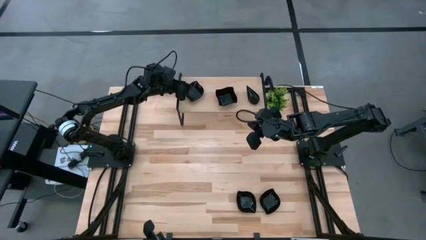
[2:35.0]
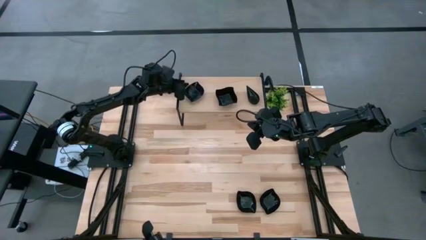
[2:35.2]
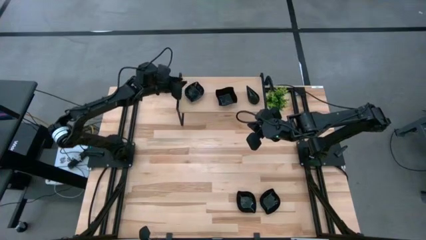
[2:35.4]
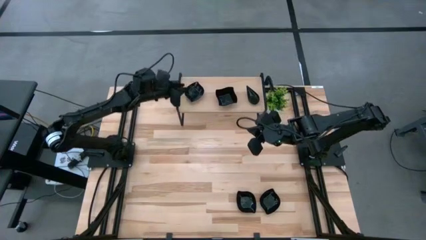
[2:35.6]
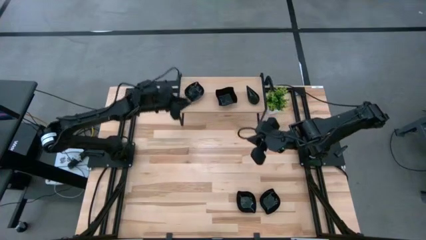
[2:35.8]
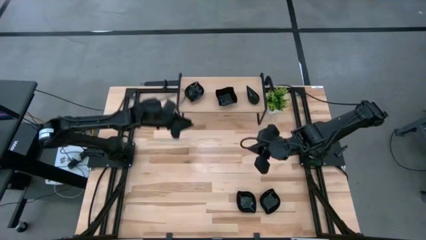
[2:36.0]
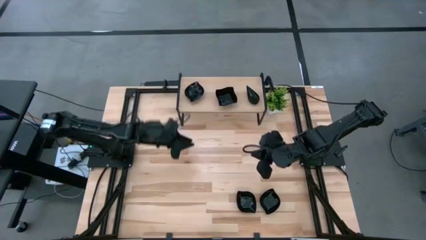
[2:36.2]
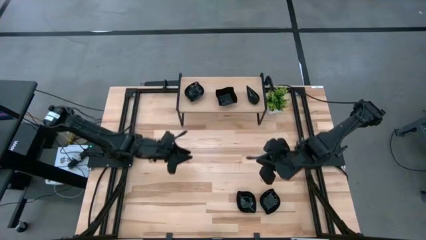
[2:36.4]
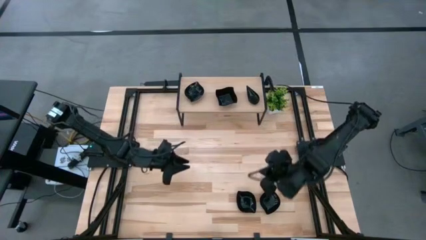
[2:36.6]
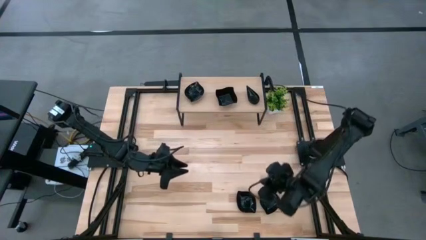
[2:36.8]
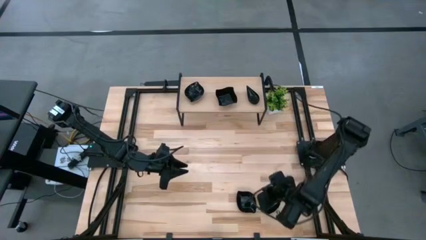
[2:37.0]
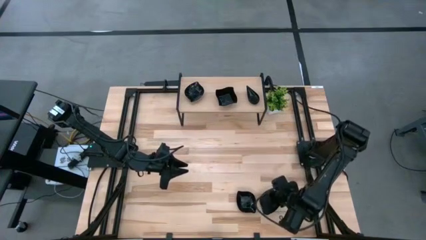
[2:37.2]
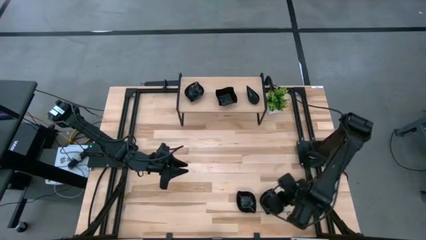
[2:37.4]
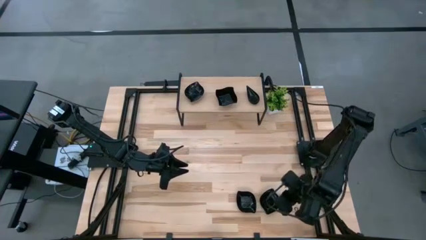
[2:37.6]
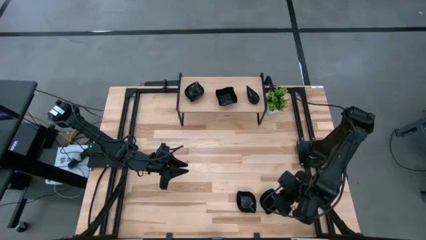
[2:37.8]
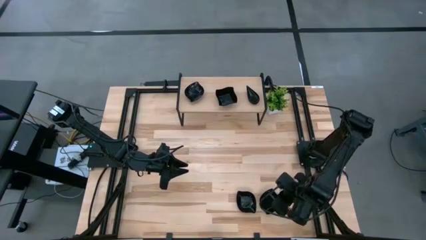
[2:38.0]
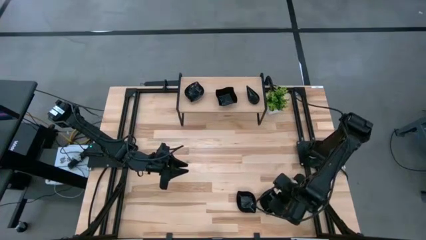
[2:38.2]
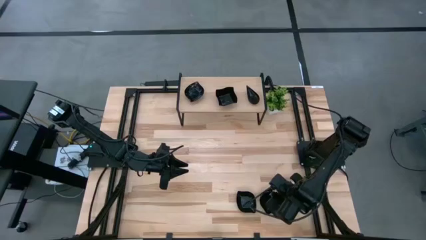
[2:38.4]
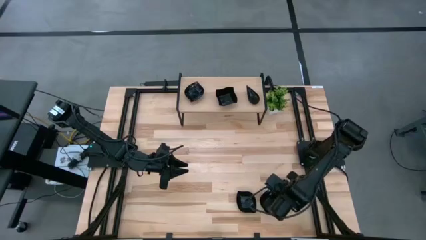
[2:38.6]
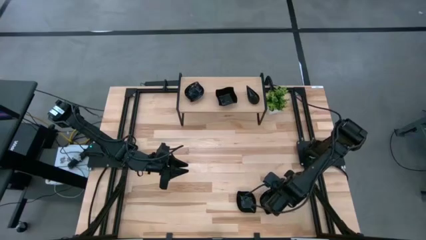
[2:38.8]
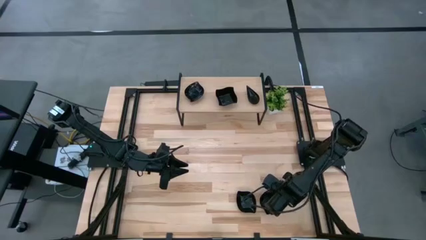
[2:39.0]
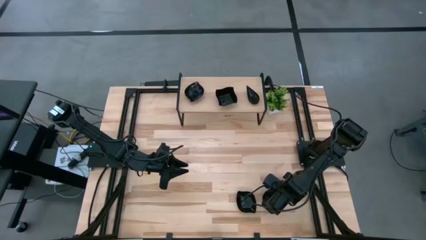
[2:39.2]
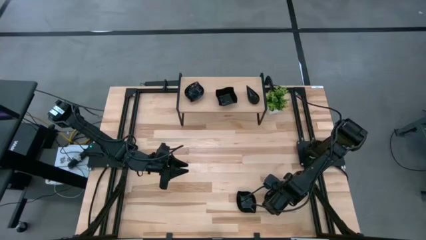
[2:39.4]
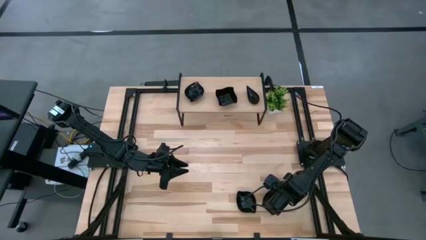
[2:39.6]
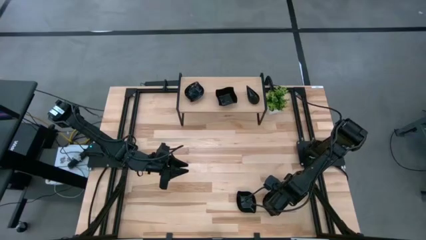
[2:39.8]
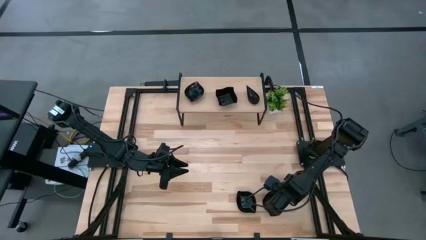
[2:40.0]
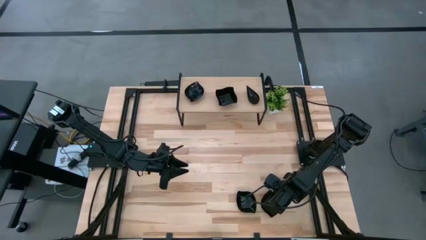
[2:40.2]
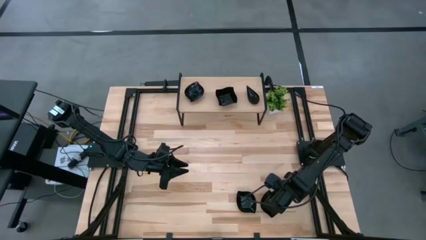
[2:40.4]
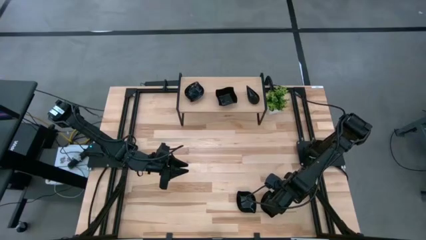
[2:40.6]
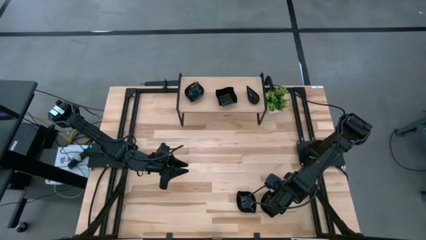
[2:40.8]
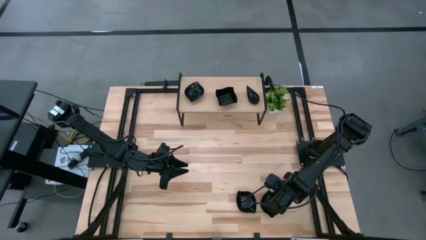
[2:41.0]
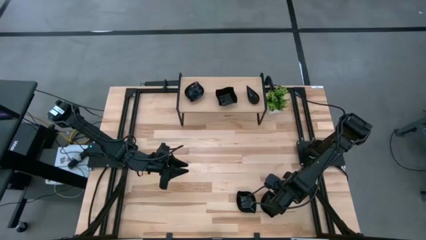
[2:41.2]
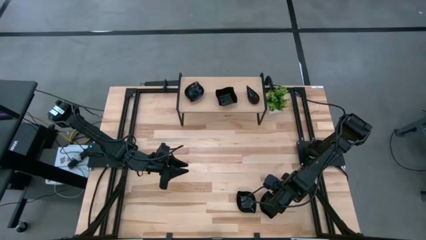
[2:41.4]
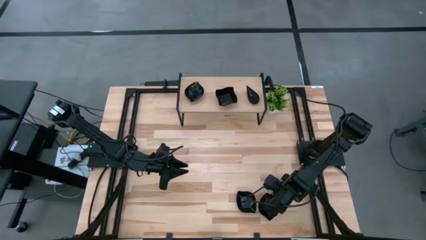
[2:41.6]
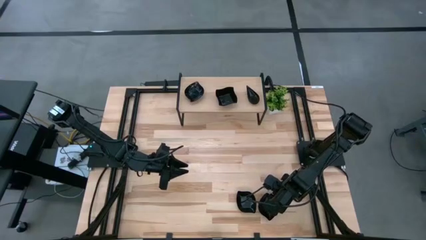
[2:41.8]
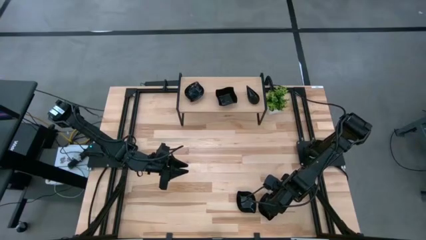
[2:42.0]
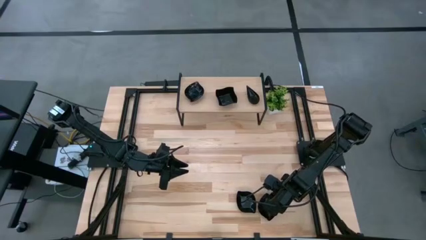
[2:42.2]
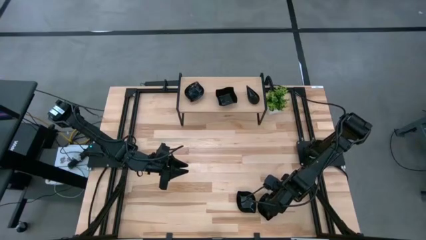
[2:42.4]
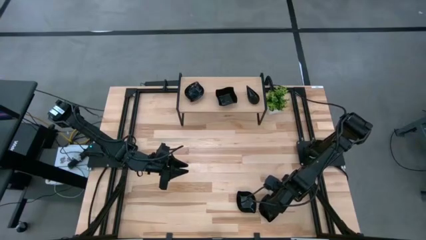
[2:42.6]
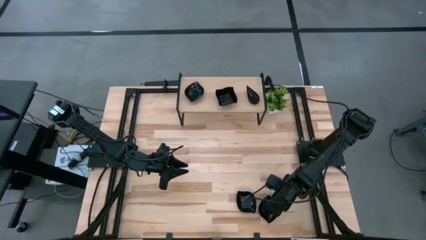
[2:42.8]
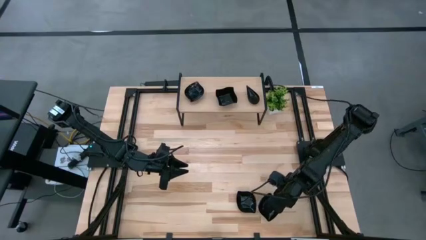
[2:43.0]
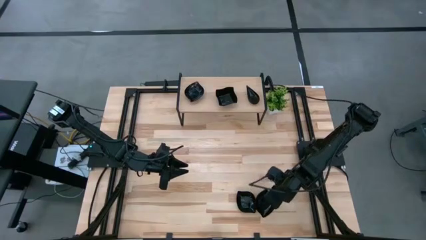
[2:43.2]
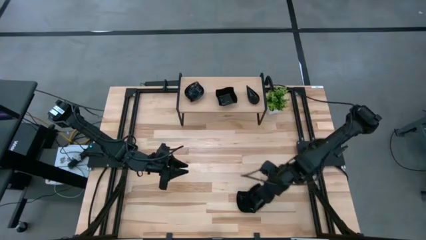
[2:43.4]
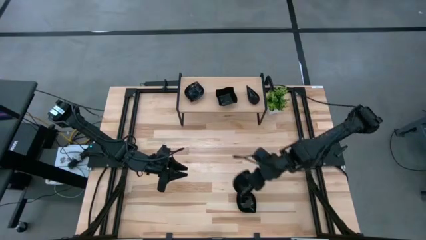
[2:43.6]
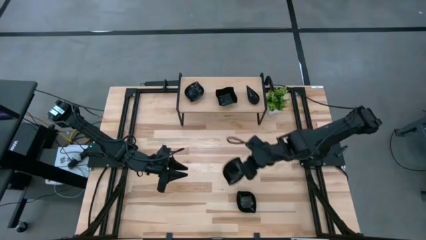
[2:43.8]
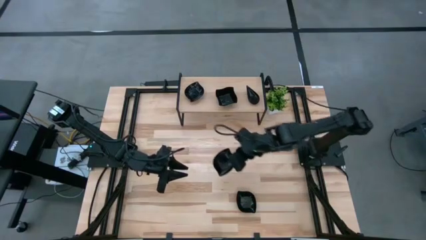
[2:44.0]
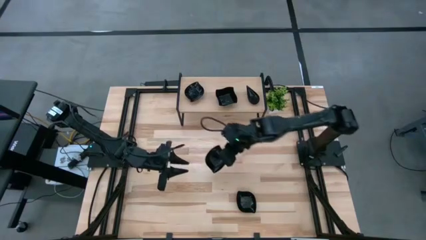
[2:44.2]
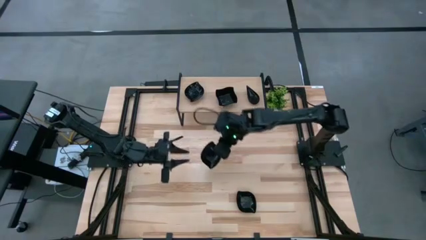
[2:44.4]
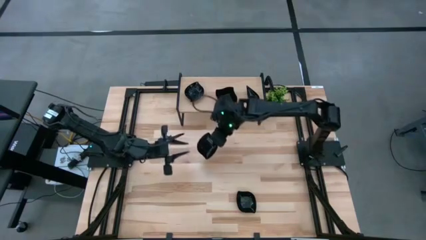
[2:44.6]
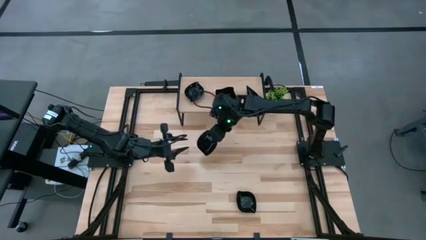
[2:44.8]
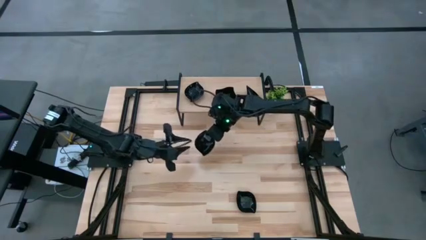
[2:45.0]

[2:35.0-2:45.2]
Task: Pick & Place Mini shaped plates
Stack the black leaf shaped plate on top of the black leaf shaped plate on the shelf
